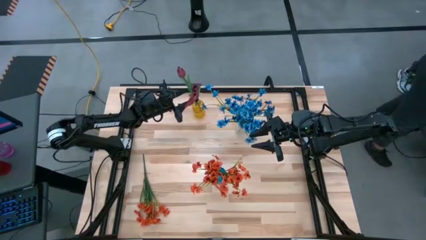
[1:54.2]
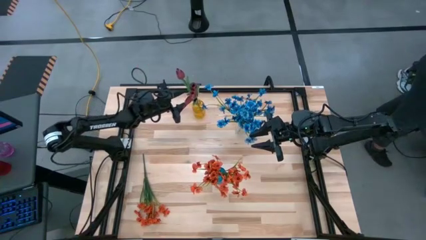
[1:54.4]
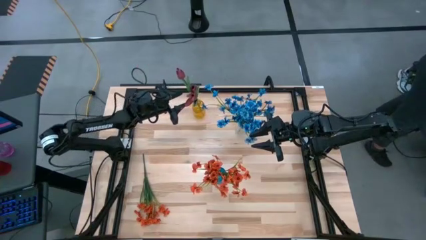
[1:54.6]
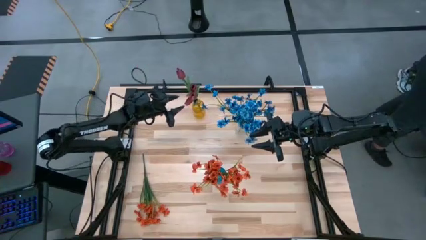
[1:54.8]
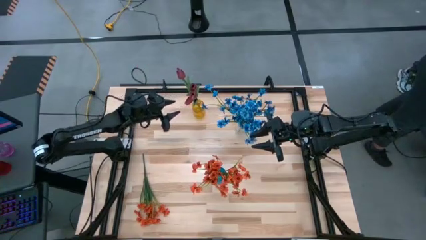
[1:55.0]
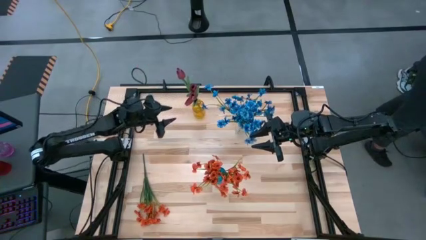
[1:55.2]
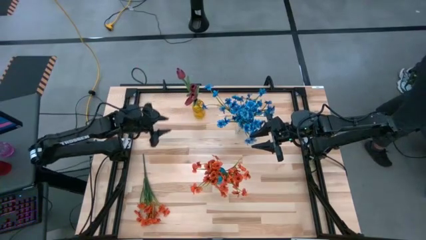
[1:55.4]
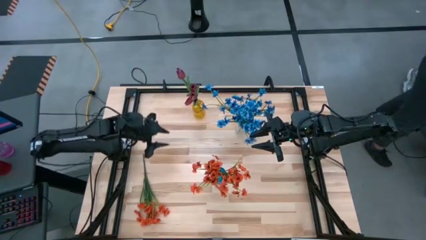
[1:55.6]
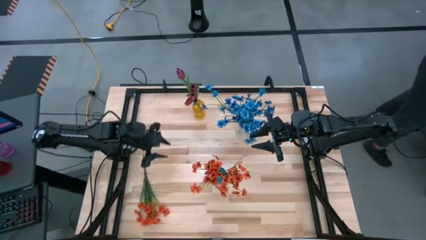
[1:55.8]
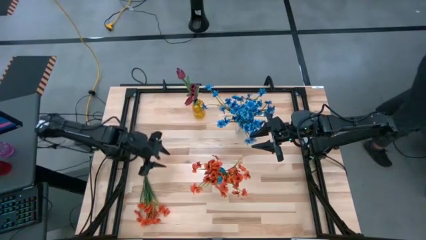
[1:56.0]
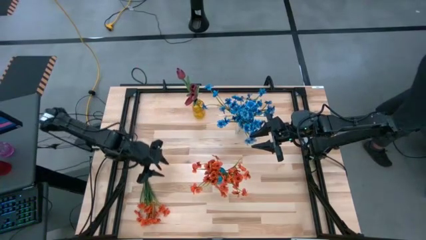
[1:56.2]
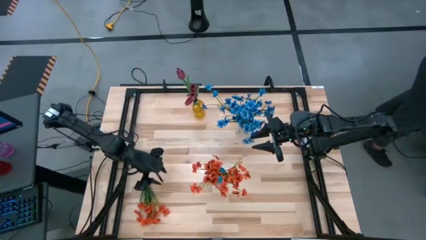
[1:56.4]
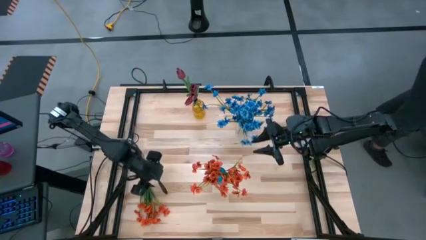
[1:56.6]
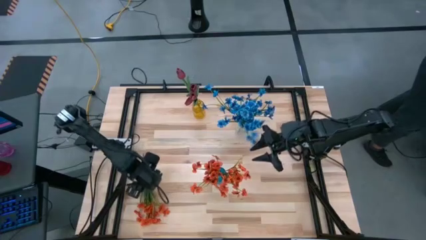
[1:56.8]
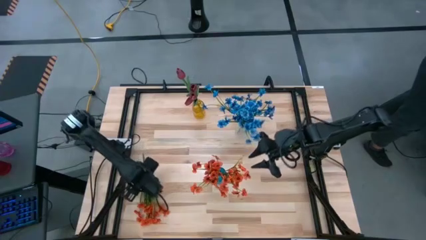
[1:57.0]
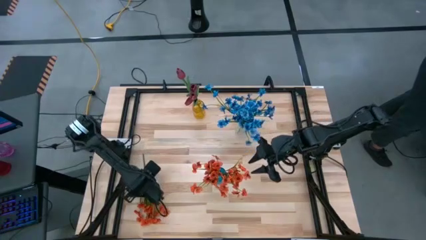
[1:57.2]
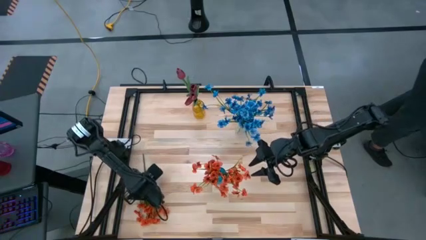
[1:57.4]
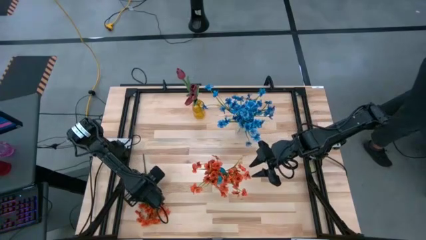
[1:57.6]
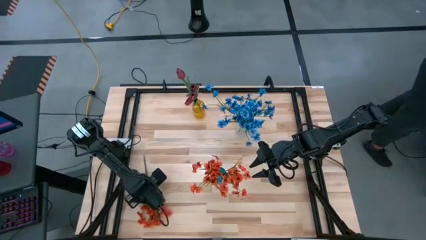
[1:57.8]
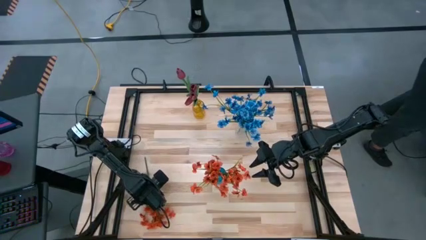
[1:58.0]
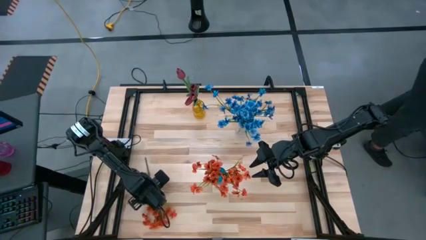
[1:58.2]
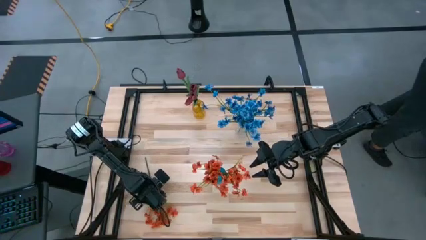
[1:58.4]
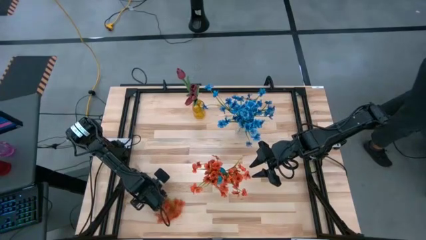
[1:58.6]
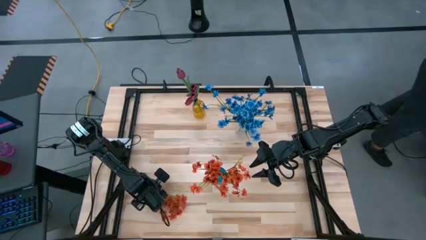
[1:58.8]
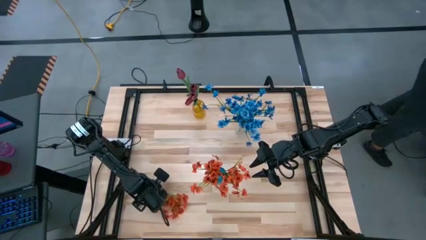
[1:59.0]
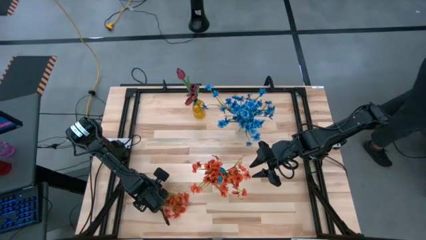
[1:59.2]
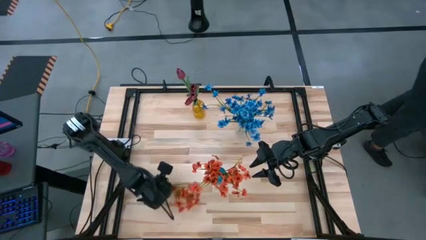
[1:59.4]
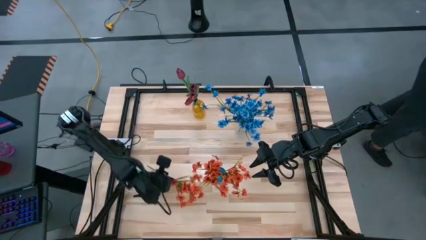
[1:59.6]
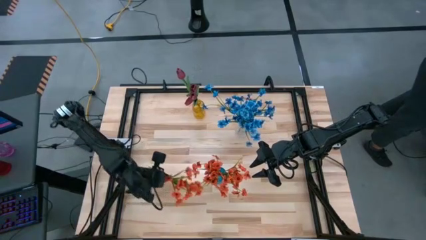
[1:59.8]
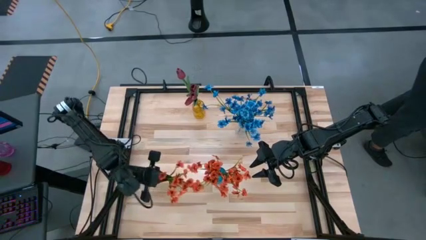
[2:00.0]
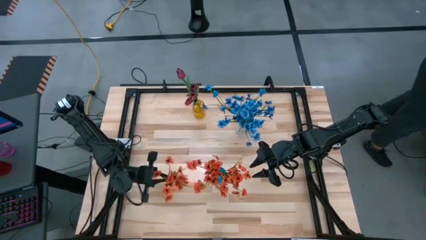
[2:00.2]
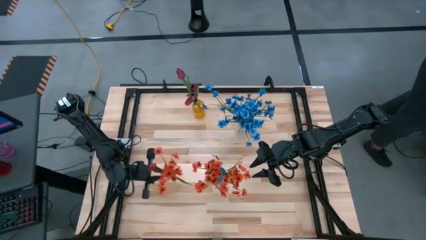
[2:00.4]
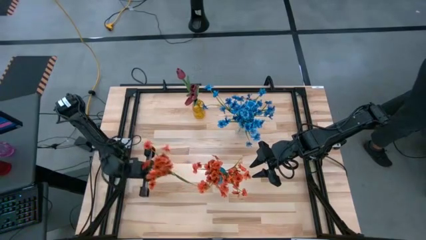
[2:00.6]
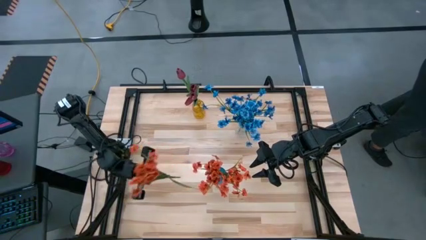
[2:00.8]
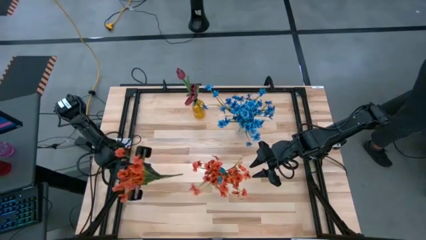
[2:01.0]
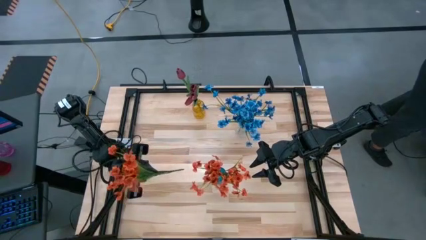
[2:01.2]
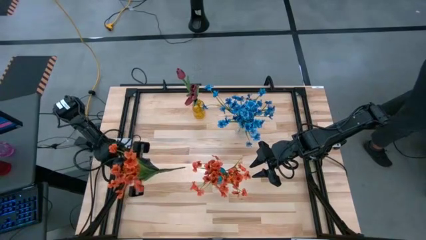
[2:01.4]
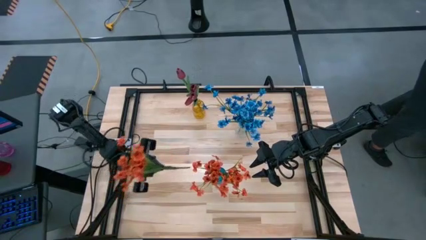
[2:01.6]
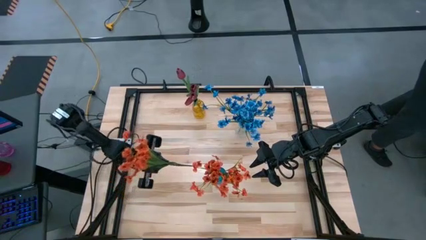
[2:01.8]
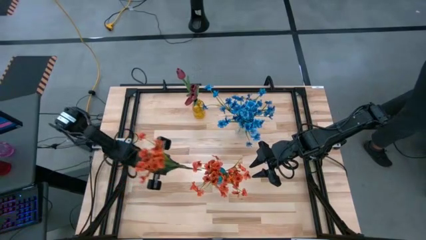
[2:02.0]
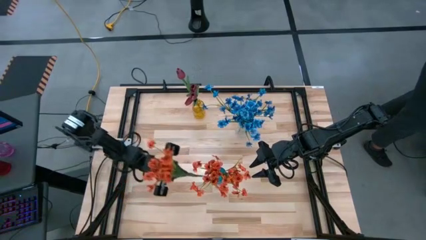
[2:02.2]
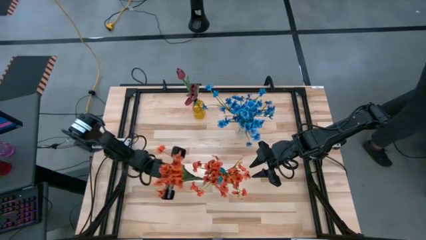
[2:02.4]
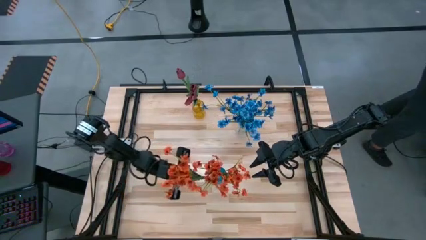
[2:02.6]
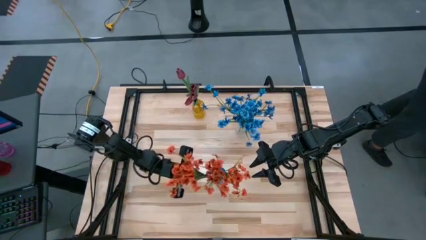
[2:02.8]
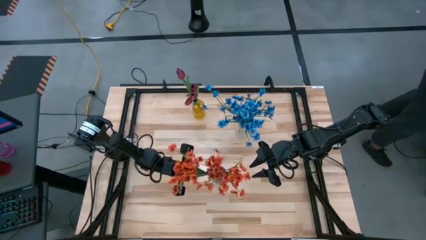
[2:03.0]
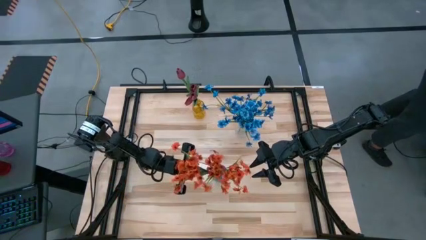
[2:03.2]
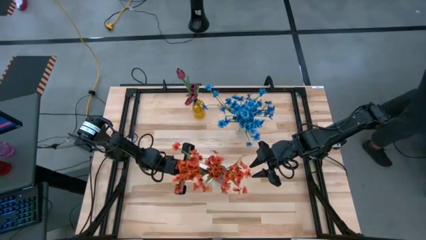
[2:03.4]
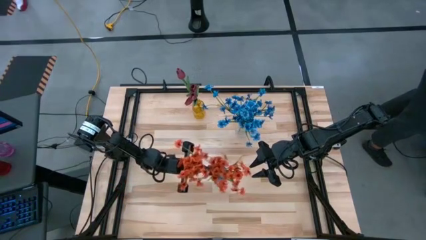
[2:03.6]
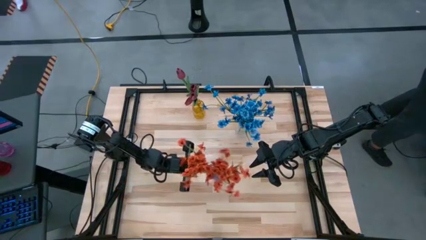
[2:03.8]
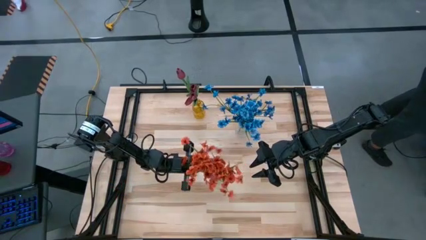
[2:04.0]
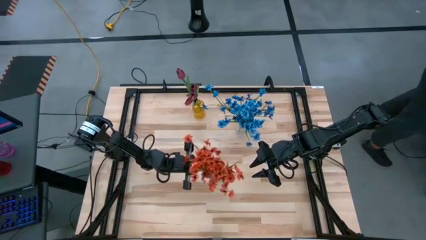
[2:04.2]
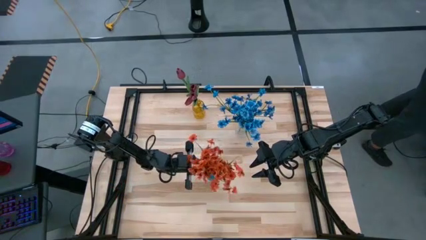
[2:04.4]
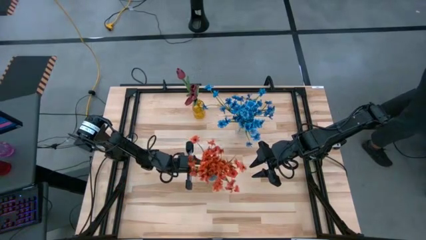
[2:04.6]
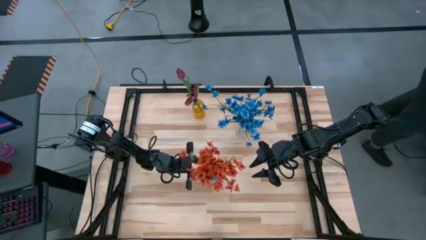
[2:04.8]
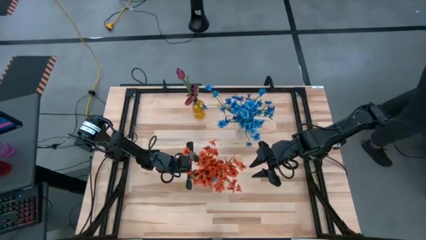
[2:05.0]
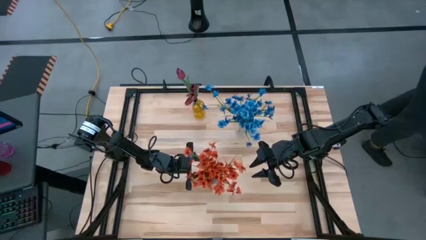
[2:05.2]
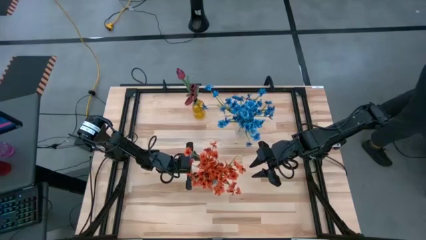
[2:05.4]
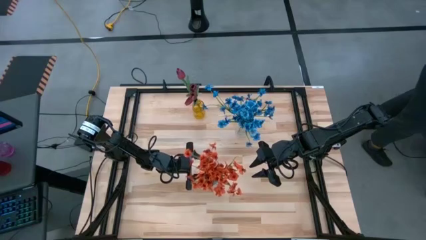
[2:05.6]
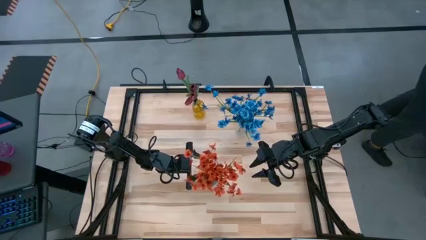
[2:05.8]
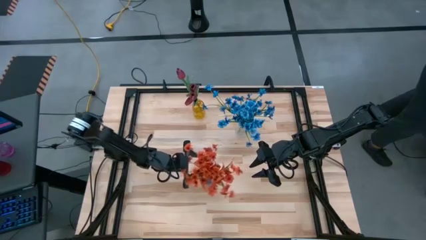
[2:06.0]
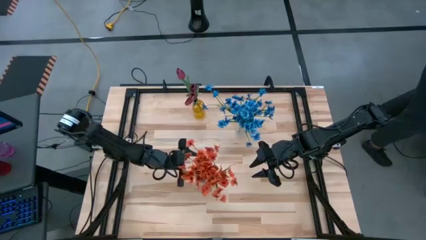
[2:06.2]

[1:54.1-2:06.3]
Task: Sort flowers into vase by color
Put the orange flowers into the blue vase

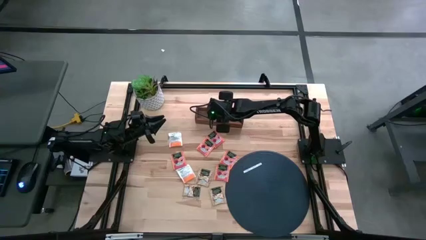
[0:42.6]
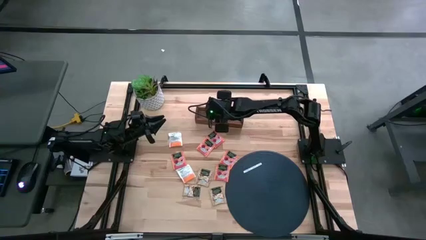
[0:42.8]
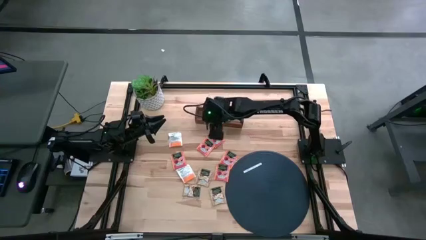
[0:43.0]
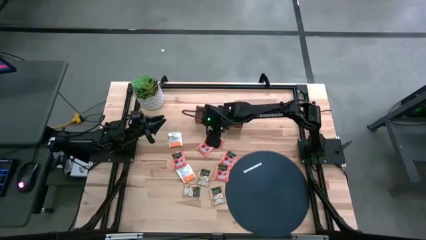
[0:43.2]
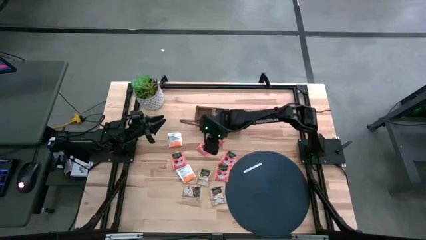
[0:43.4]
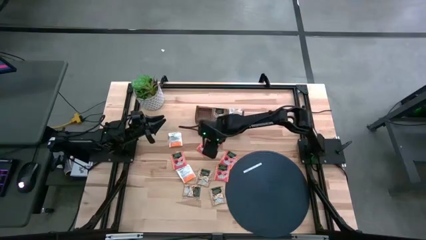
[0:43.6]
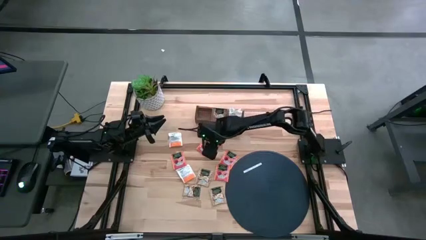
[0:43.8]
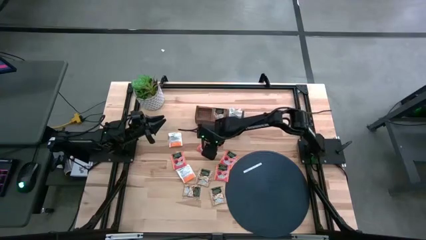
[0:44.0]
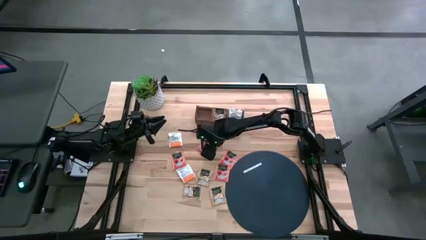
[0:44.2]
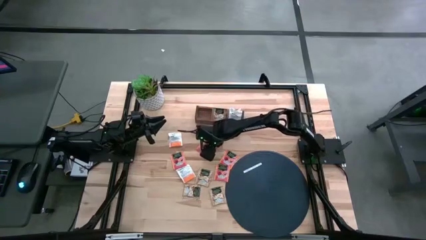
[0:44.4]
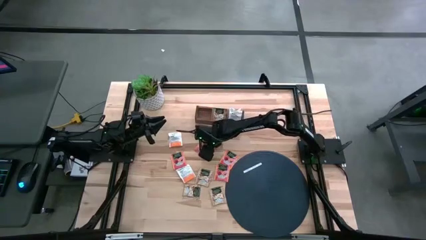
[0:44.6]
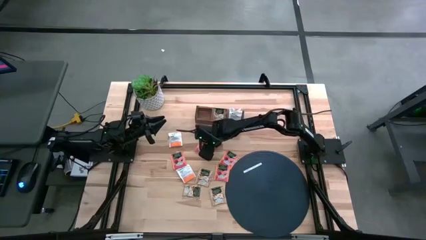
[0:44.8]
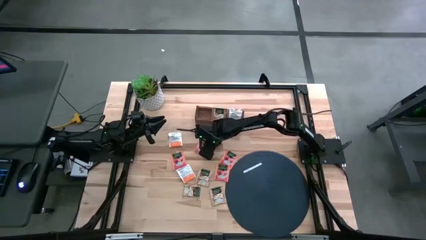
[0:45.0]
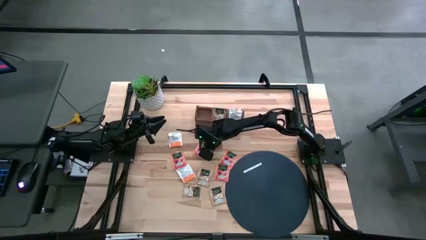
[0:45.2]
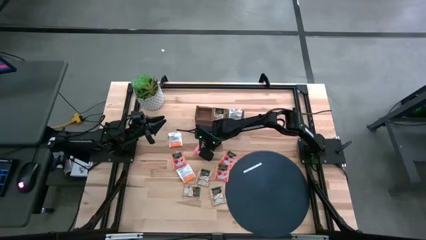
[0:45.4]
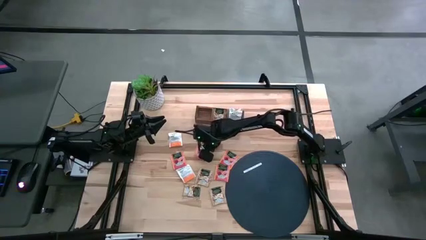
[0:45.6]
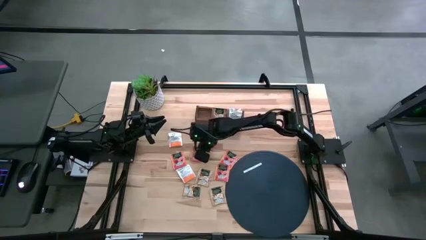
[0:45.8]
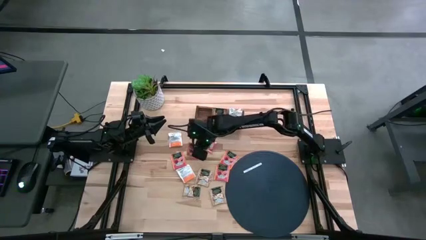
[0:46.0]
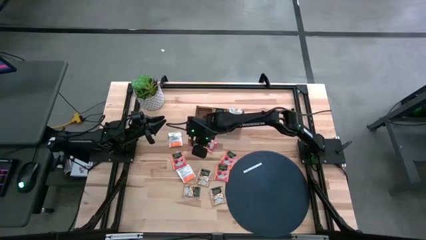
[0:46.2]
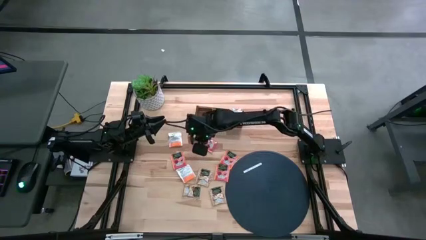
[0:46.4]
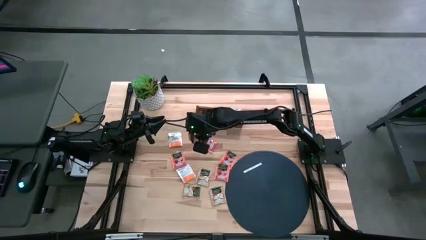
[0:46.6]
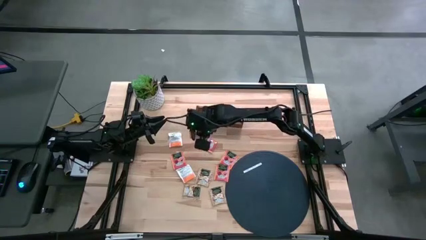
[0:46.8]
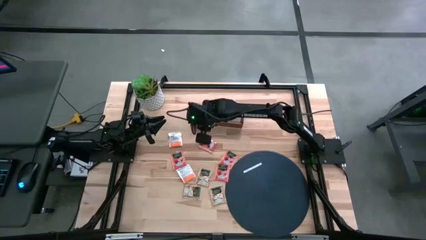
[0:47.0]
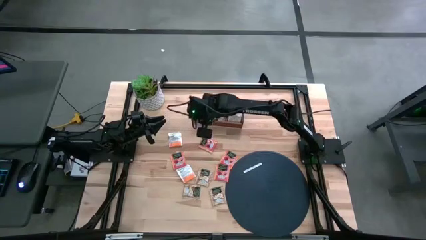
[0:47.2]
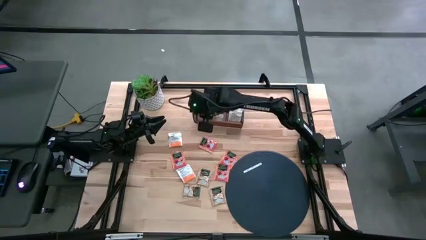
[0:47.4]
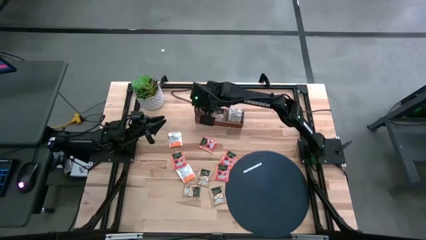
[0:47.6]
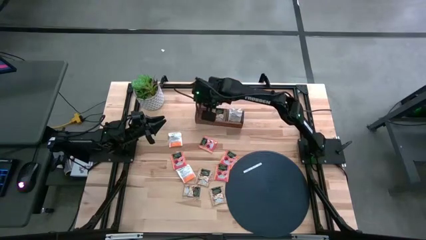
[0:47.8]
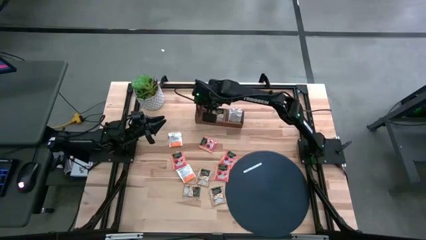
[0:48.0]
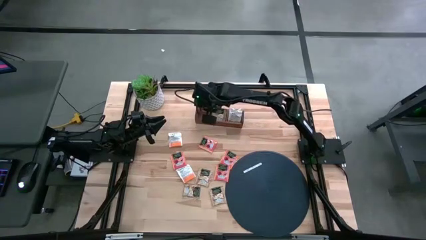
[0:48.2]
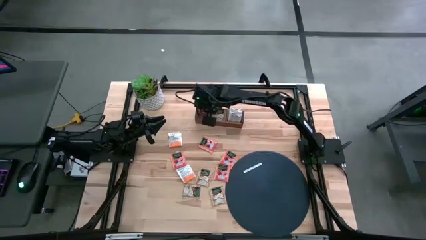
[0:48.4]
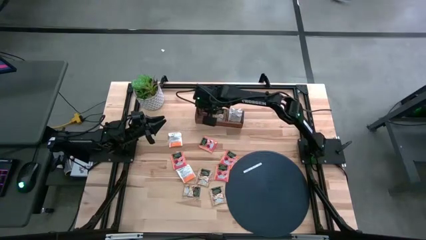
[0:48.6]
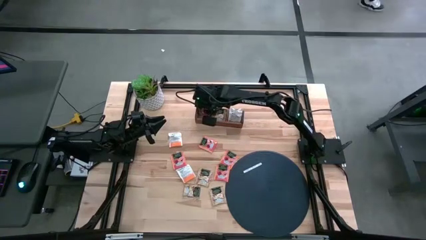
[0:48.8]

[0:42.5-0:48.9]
Task: Pick & Place Tea
Put the red orange tea sachet into the left section of the wooden organizer
